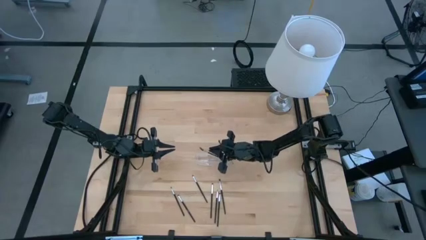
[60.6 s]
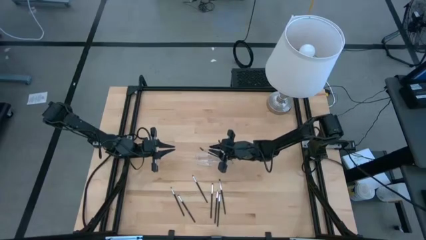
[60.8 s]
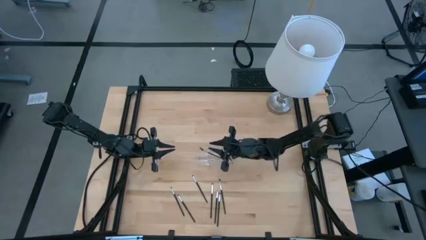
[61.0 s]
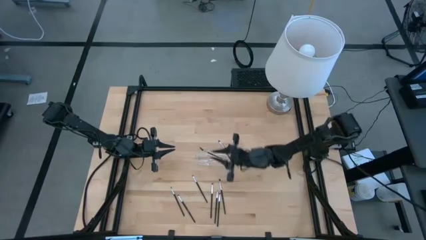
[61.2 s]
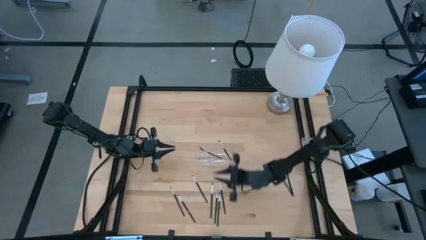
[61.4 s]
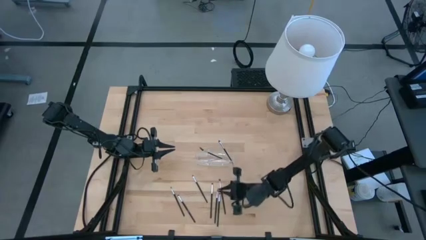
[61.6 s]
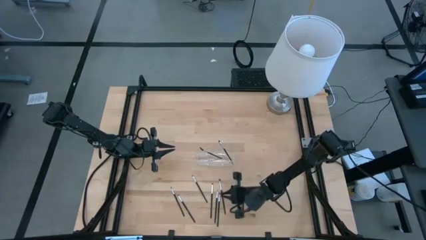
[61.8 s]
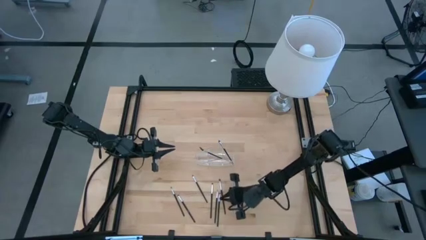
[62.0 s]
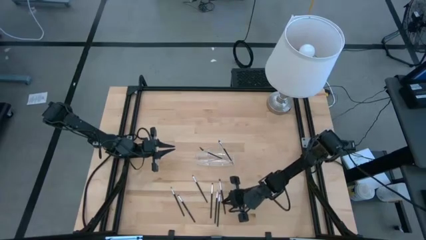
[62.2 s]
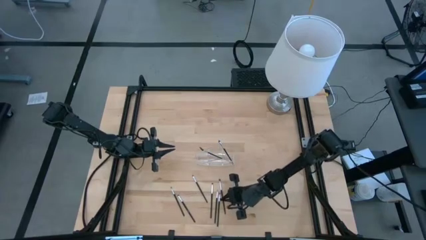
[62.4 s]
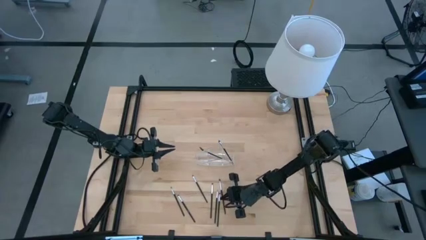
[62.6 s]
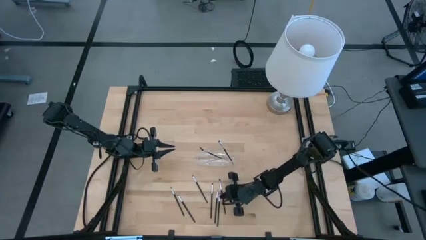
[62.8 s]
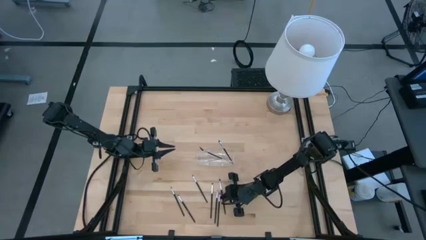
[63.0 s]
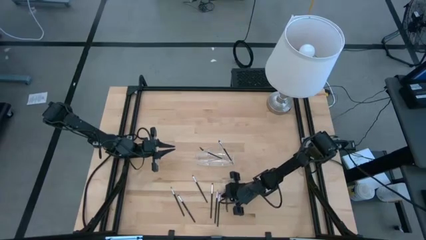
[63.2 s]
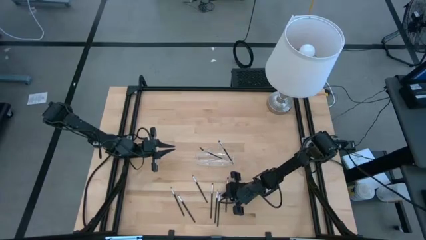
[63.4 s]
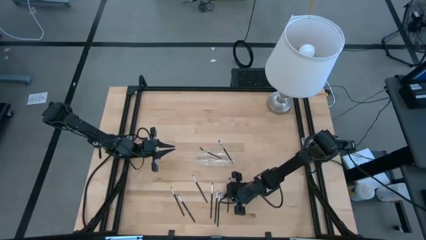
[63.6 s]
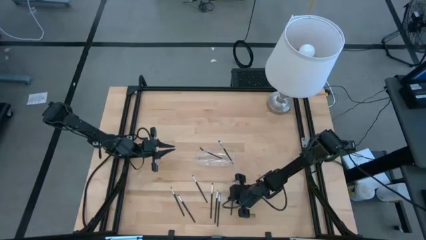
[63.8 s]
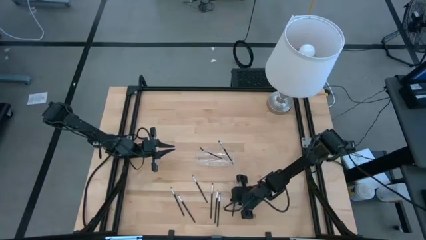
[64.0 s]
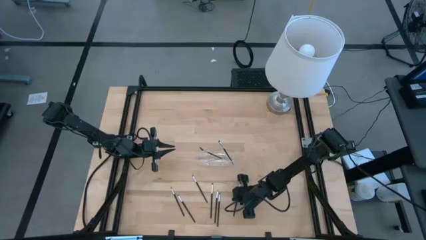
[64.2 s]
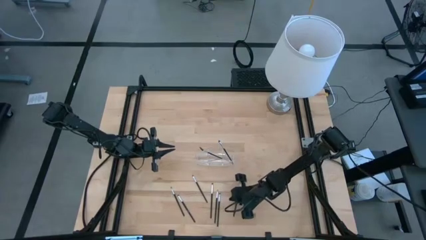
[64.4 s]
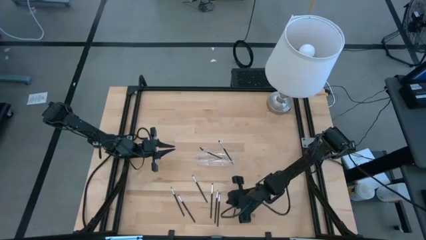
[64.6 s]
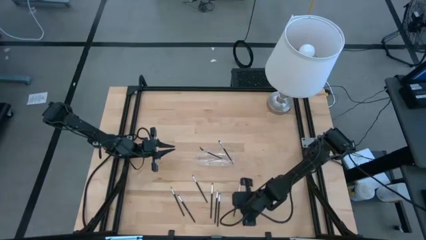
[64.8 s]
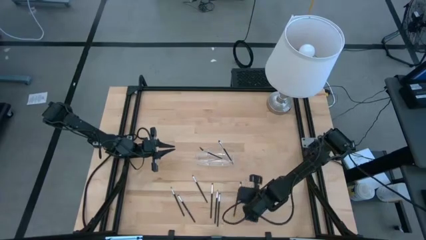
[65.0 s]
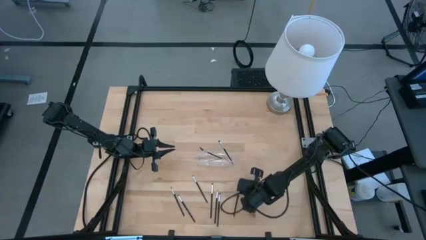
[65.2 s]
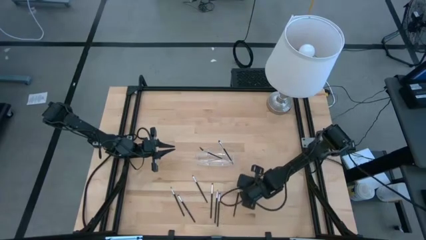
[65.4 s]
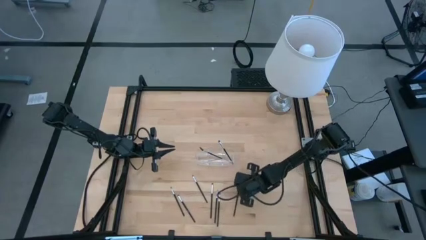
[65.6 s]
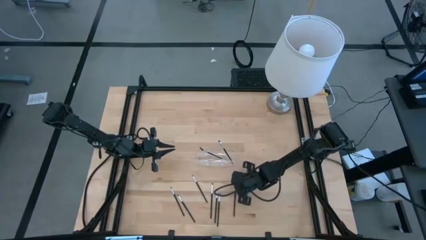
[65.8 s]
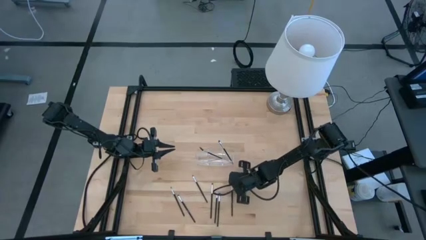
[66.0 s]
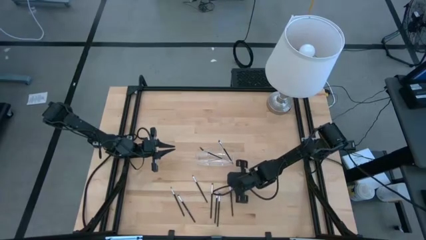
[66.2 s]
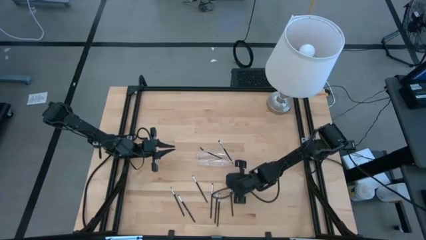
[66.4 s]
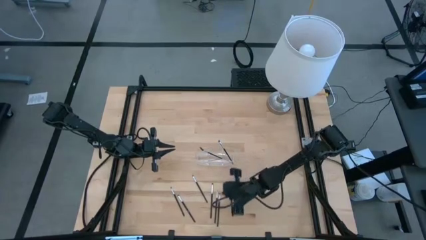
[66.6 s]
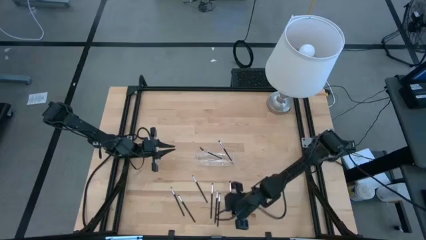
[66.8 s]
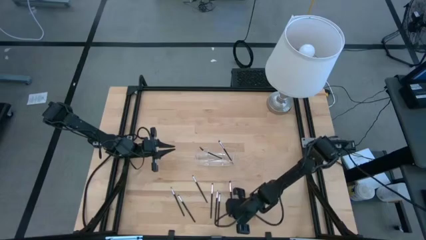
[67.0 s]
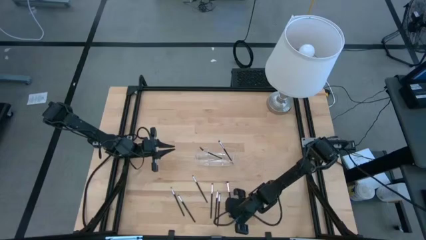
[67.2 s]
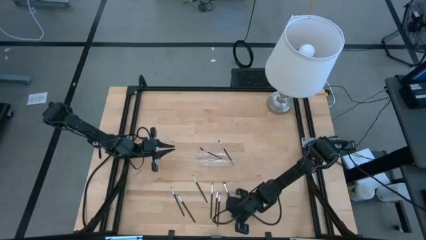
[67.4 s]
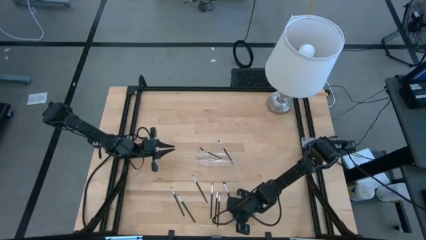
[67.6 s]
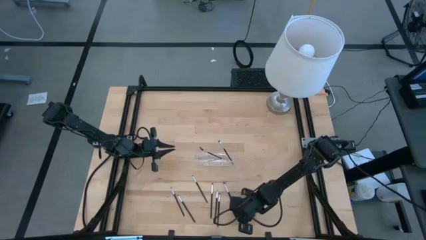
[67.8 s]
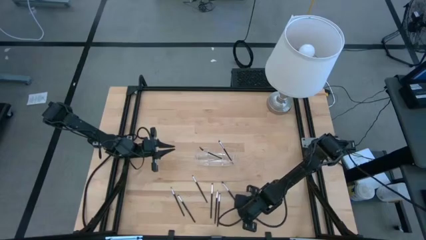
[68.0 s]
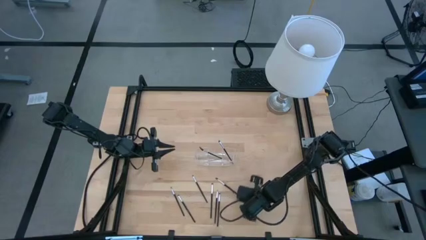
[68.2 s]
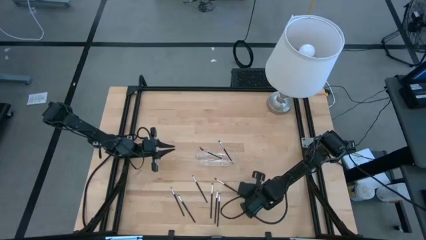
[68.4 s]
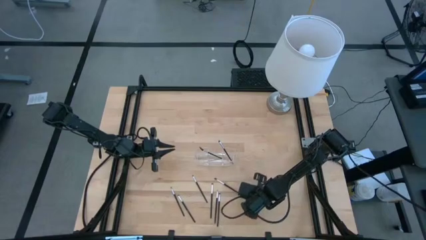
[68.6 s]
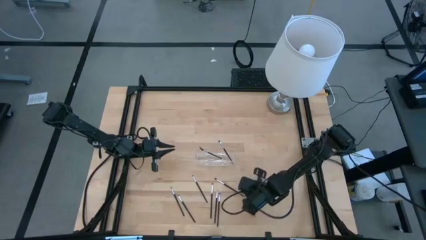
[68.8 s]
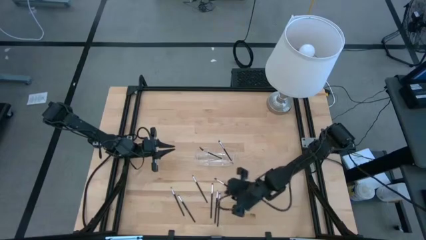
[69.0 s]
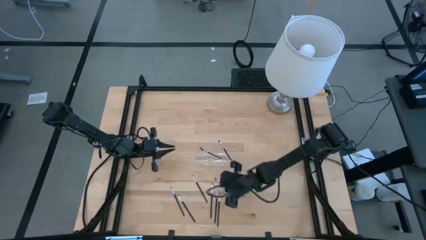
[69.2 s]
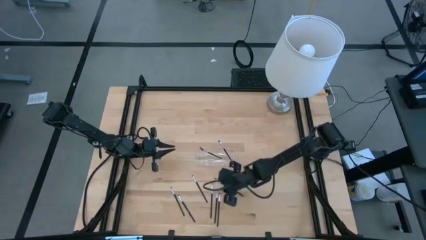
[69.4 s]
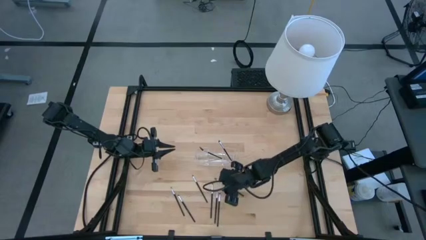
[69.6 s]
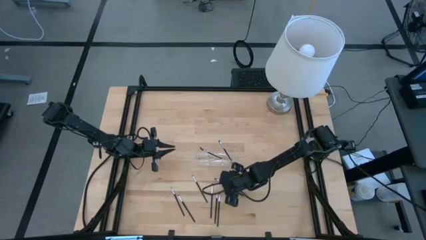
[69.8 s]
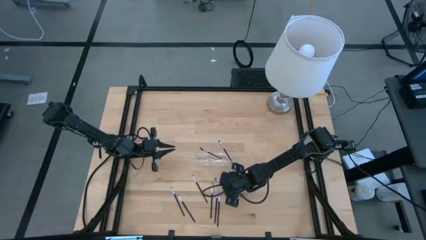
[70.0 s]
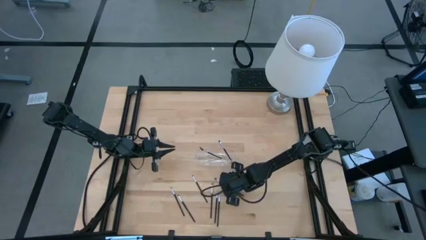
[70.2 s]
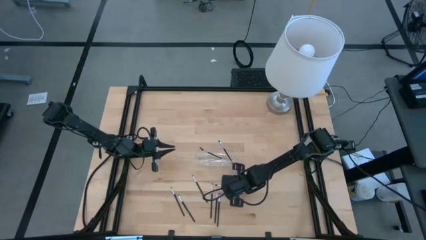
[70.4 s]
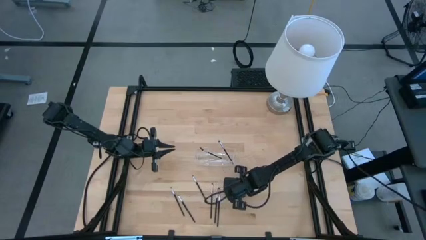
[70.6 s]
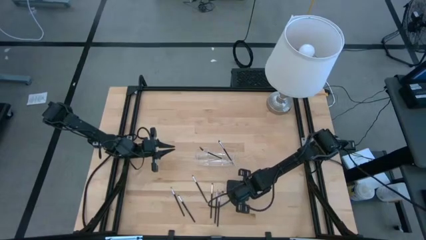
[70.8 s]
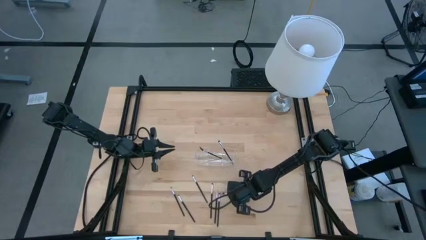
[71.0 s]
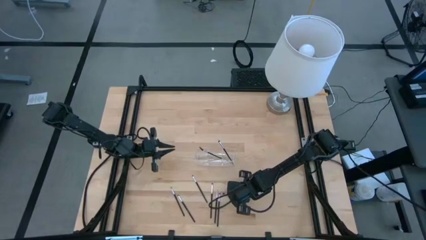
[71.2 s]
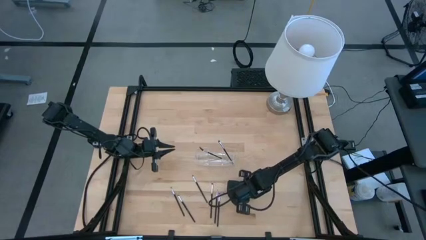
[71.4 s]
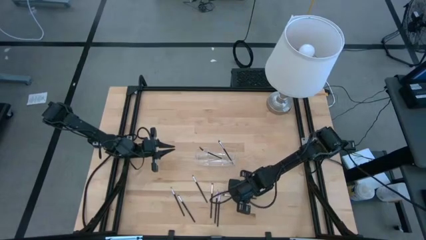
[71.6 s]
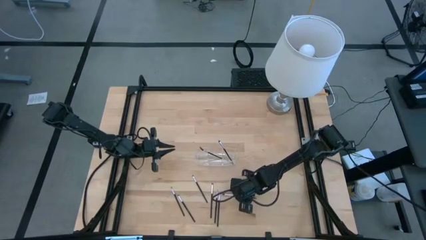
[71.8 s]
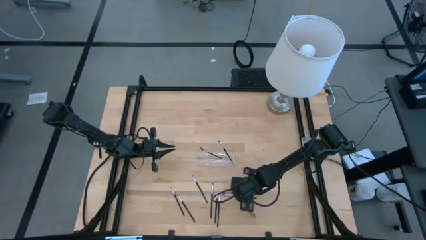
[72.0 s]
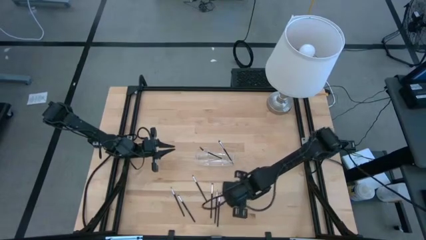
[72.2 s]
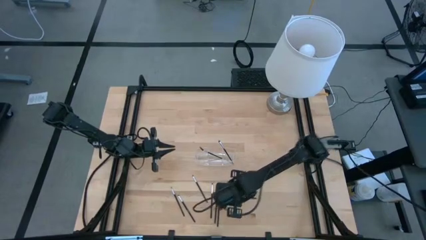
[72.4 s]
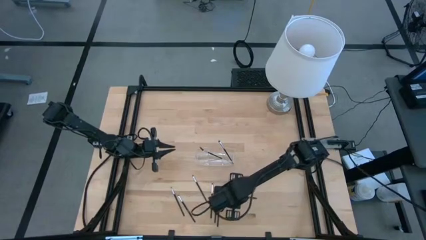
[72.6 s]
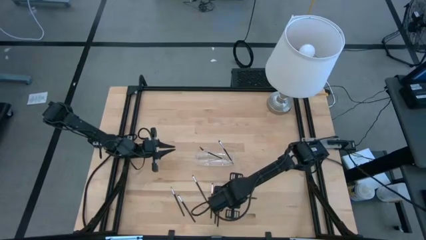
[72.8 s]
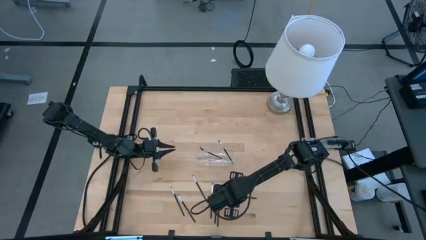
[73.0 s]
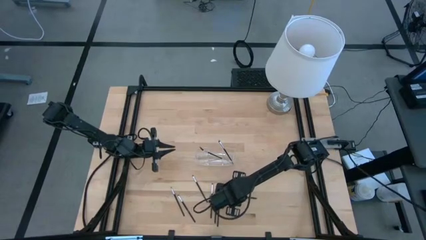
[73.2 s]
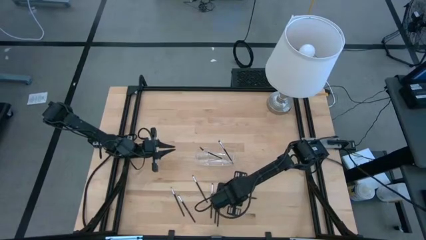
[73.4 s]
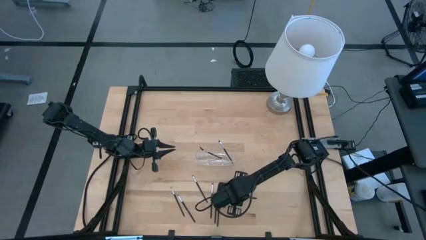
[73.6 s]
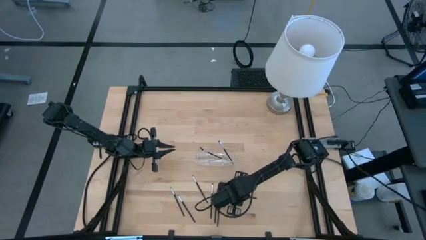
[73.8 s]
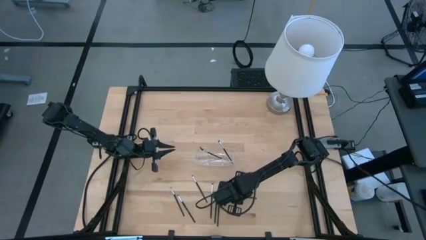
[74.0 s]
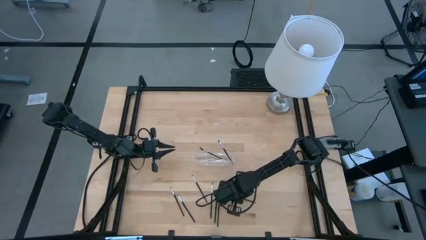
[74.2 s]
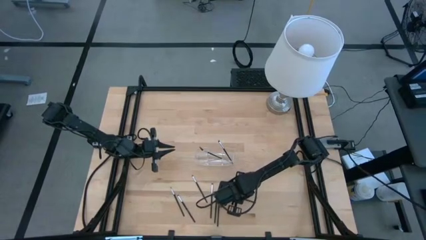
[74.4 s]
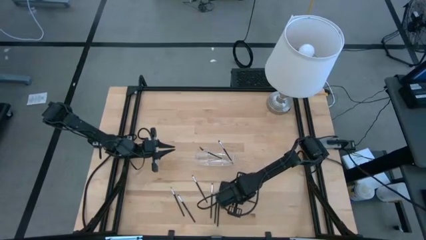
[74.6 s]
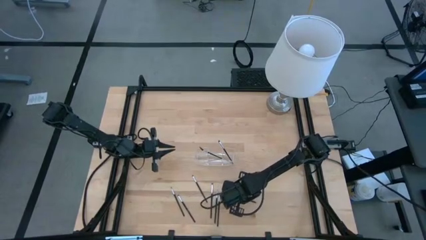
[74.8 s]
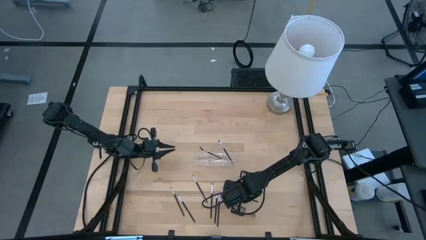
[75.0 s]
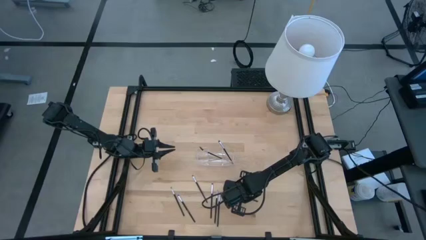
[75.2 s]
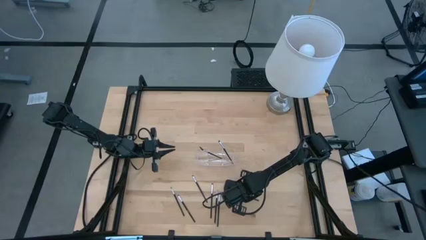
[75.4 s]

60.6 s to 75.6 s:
Task: Pick & Place Makeup Supplies
Put the makeup brush into the transparent organizer
